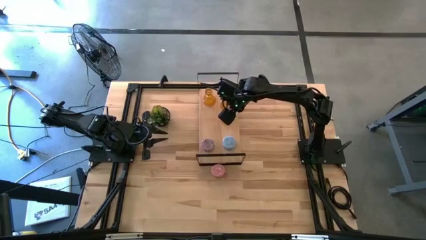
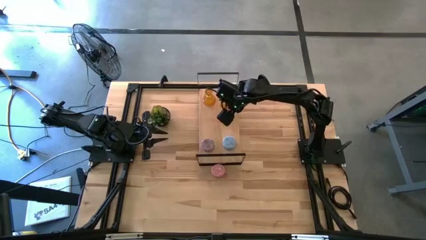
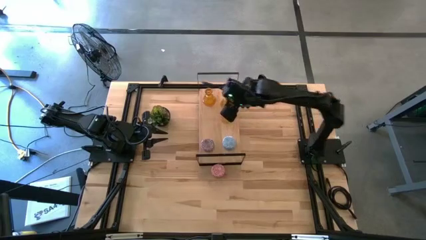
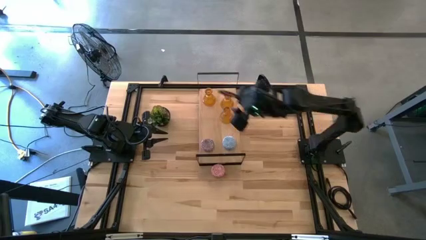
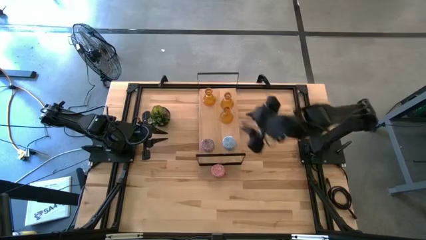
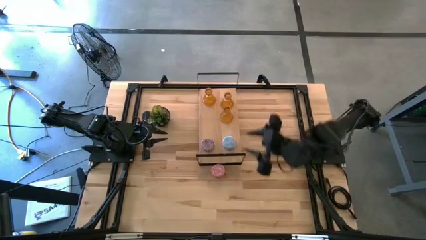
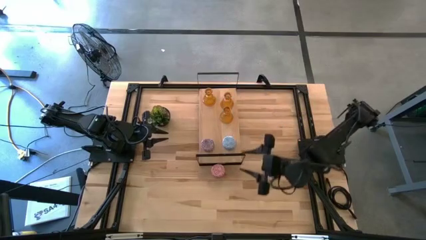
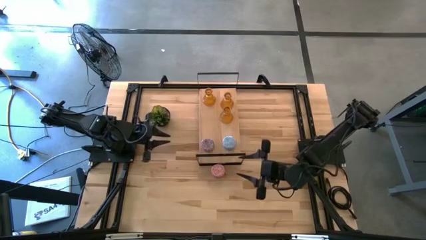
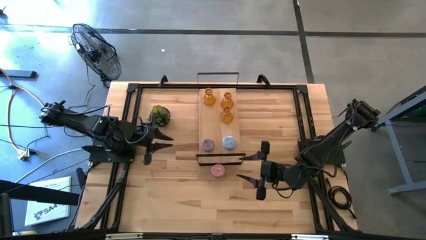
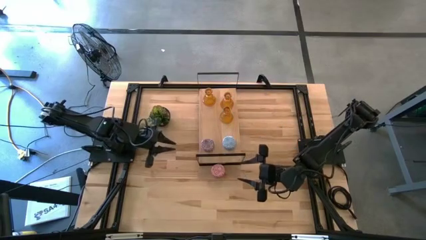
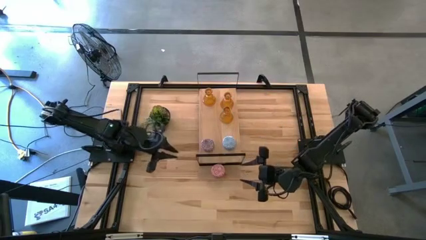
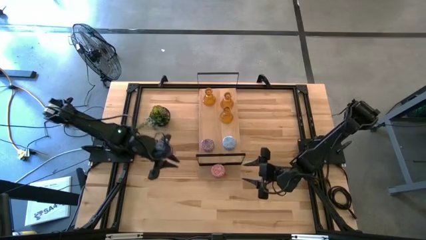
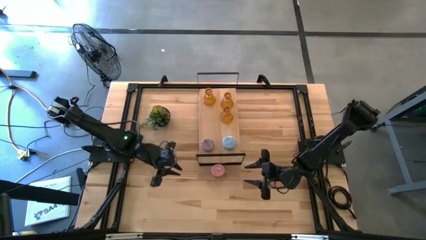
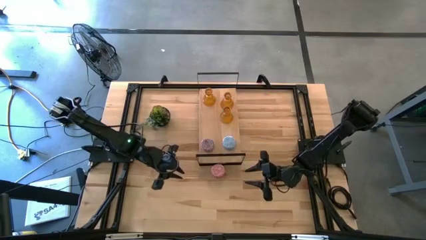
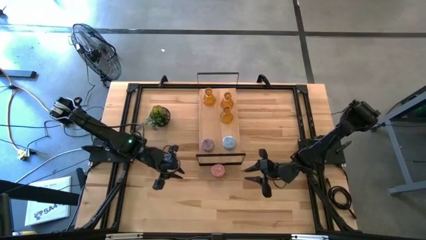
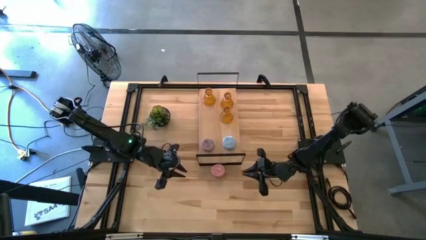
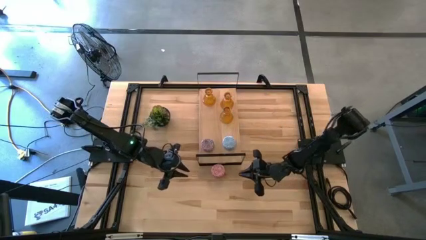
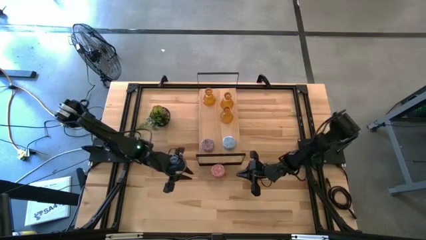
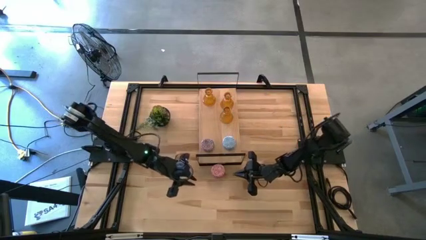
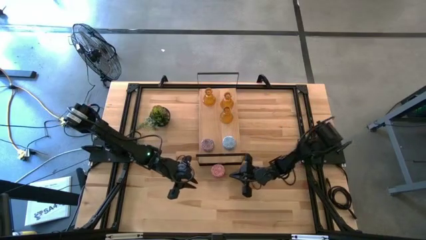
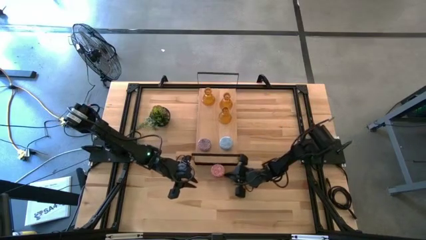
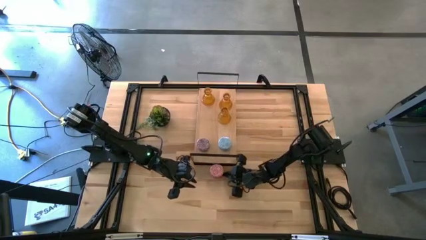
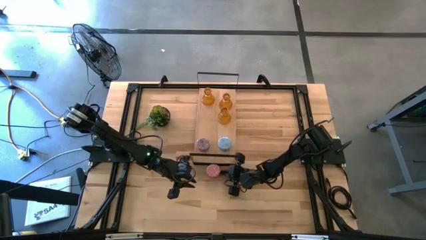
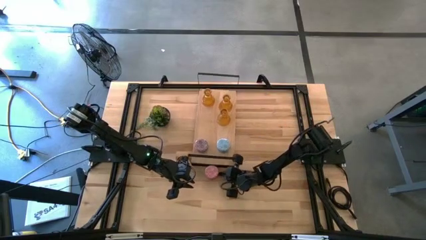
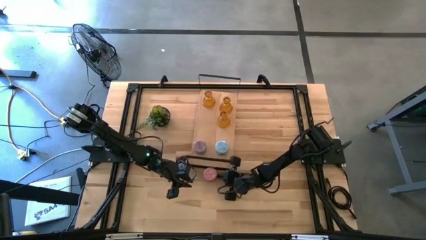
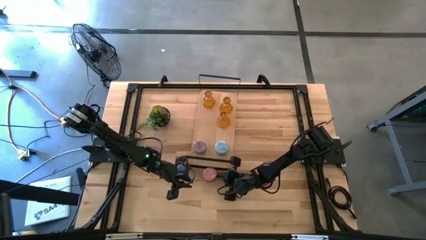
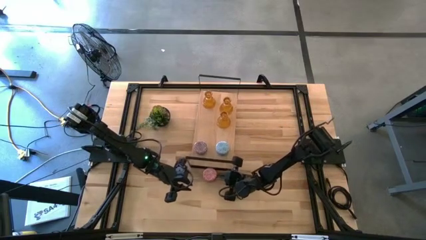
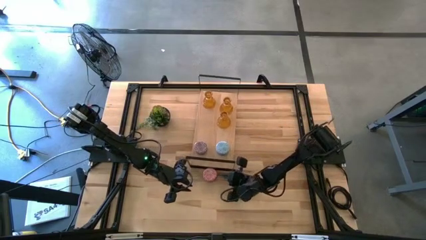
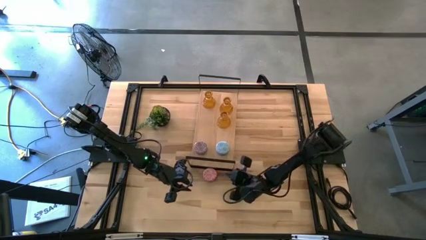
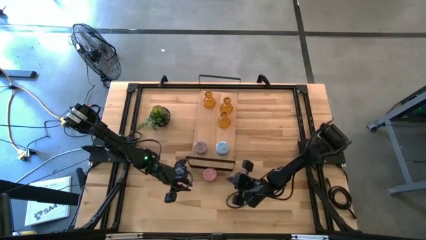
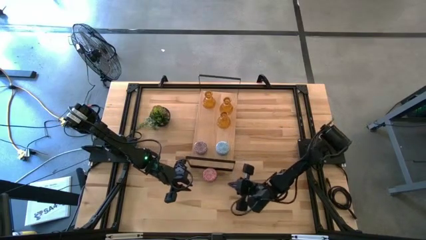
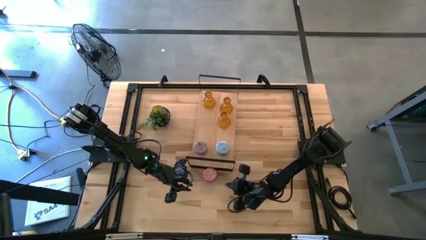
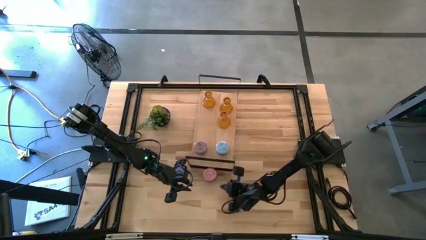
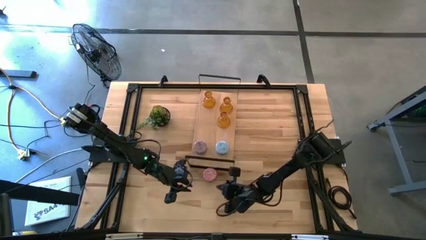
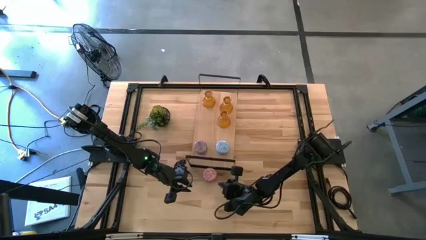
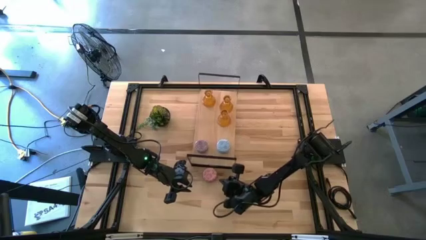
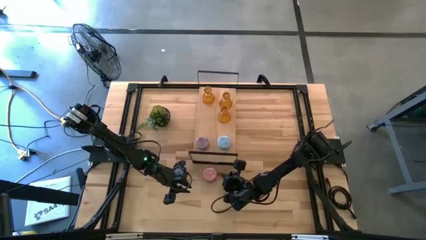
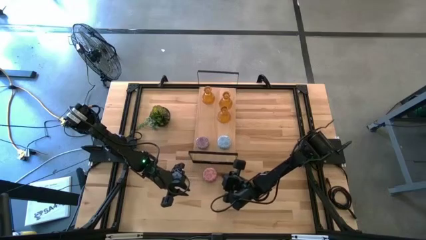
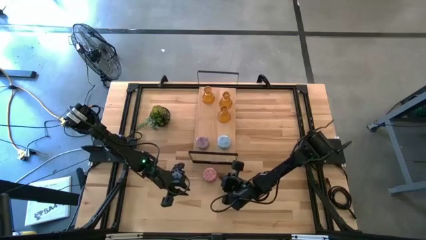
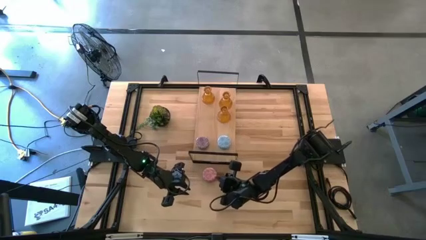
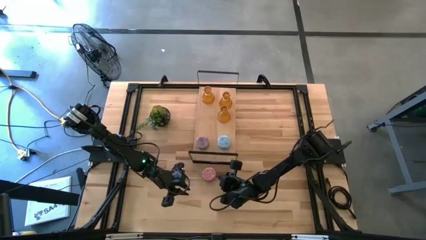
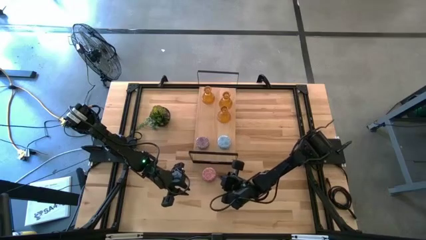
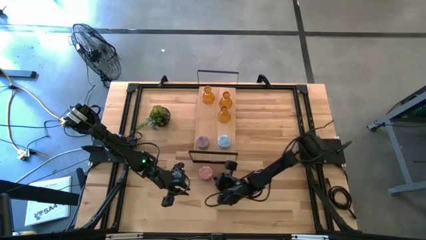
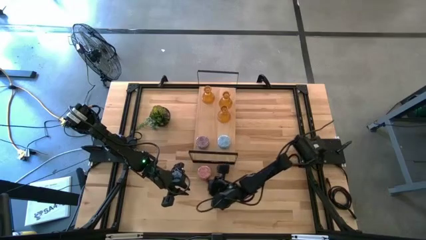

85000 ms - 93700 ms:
Task: Pick & Place candle stick holders
Put the pink scented candle on the shelf

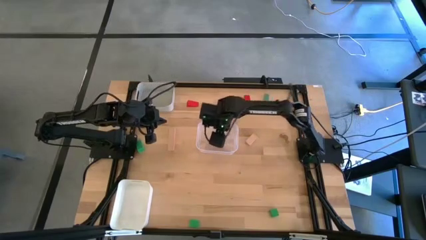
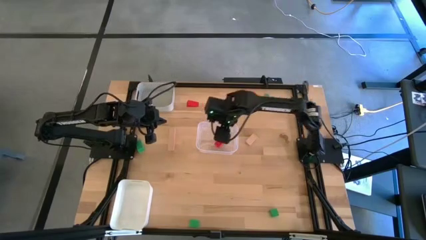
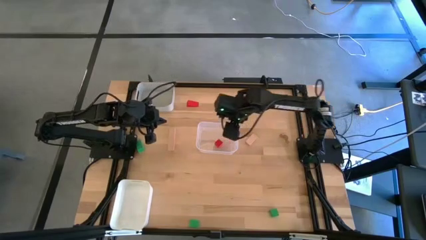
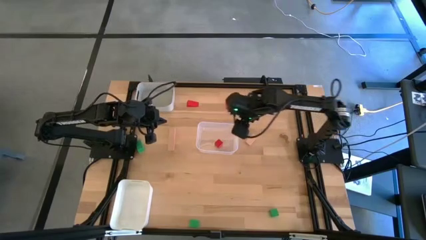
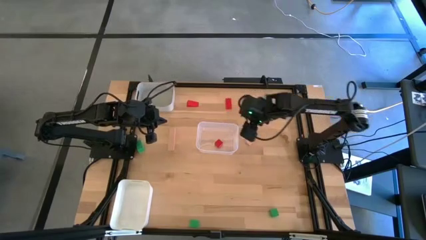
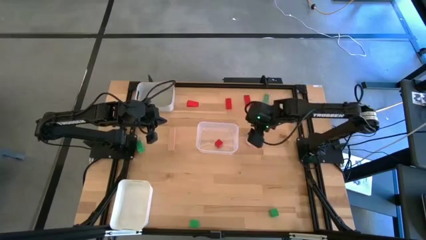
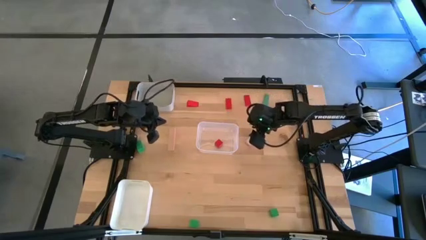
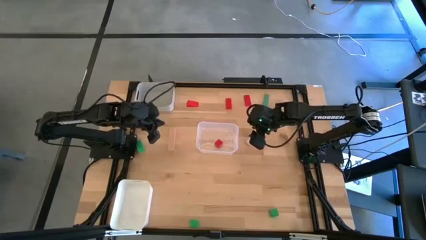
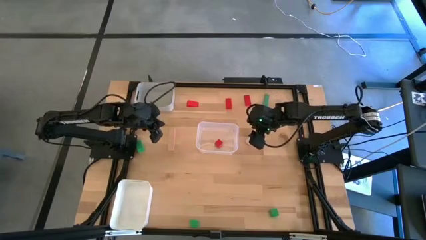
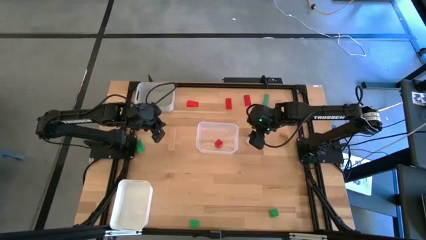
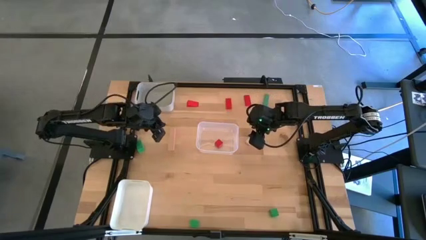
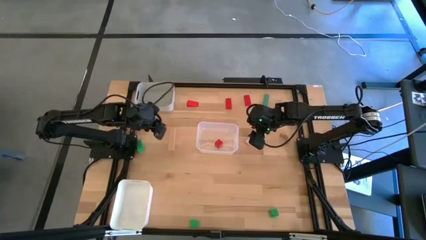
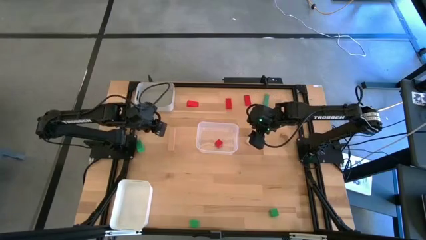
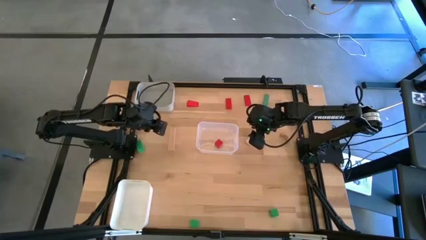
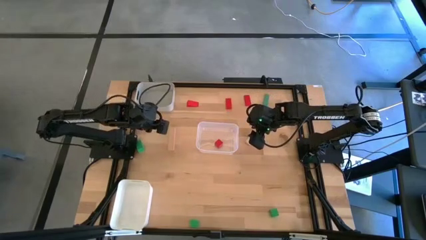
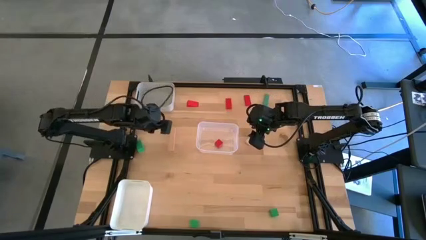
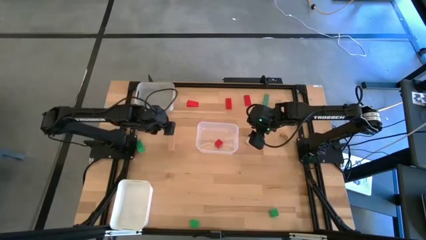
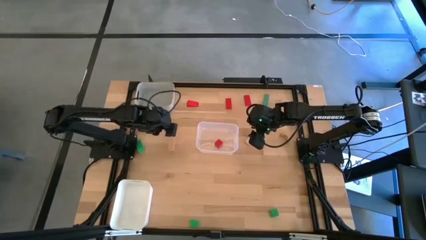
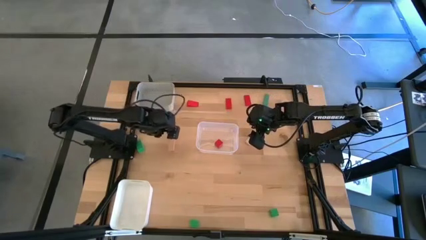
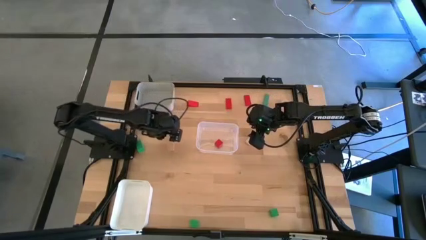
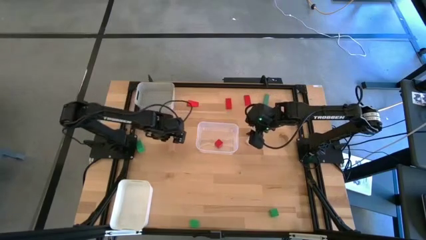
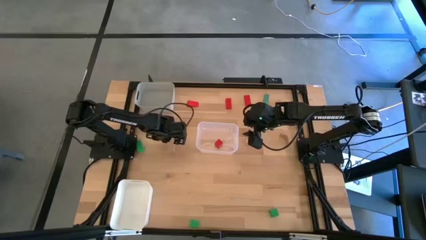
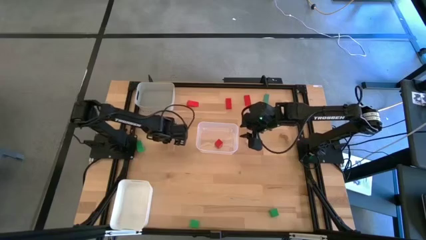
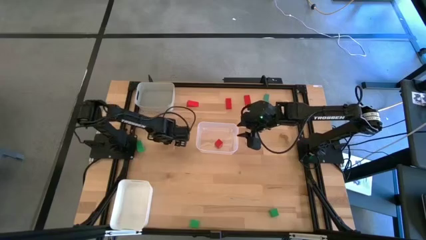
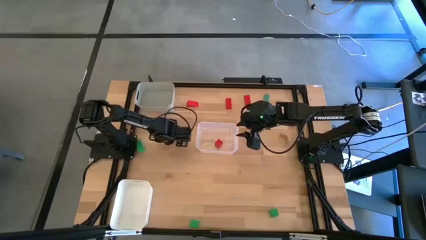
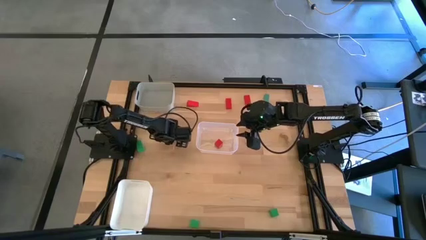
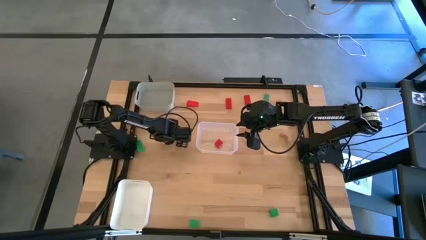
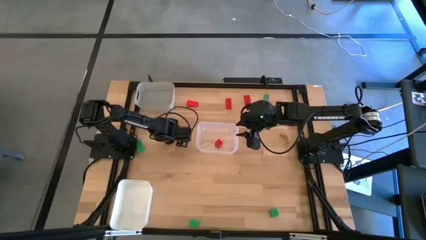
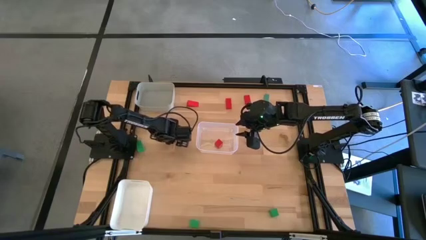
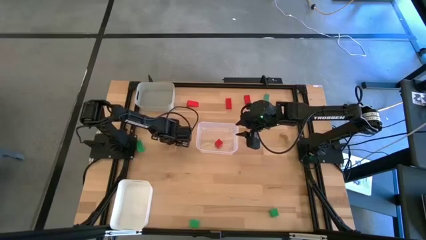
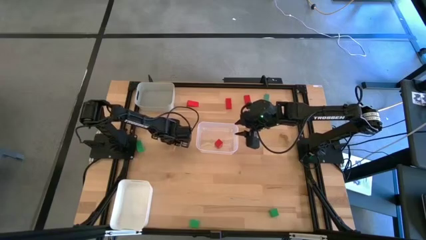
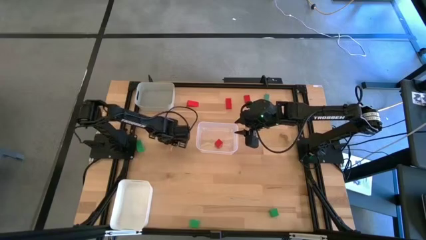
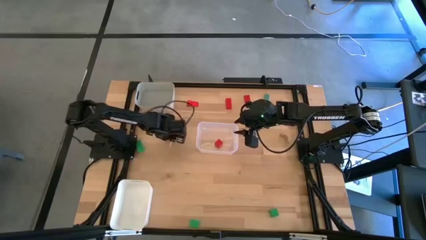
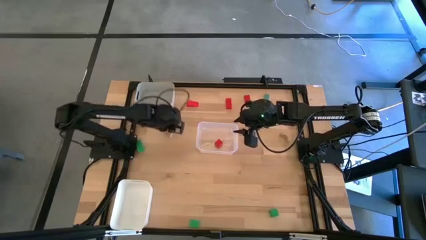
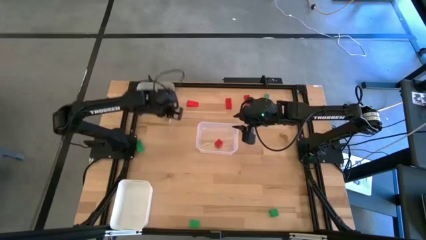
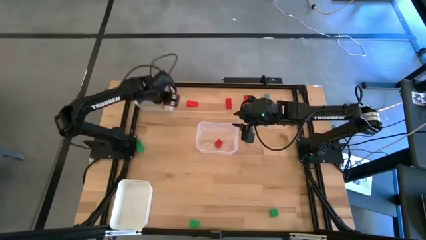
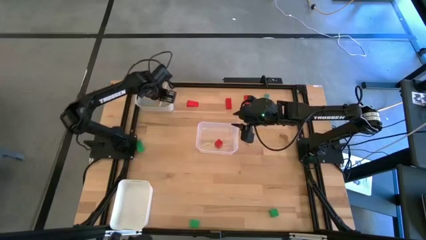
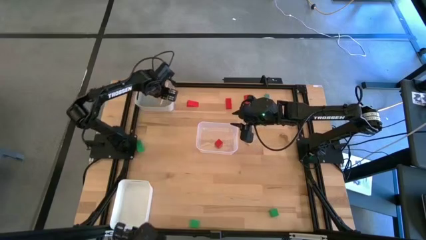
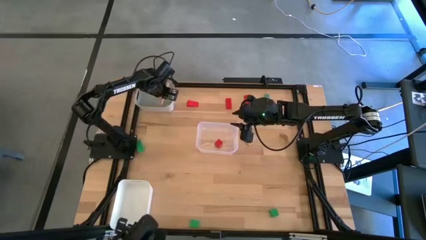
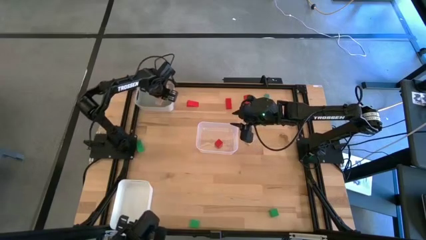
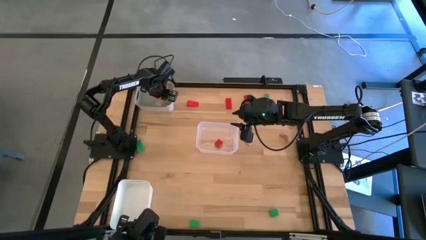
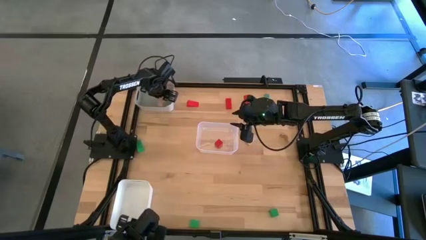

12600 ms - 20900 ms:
Task: Sort & place blocks by color
Put the brown block into the gray bin
